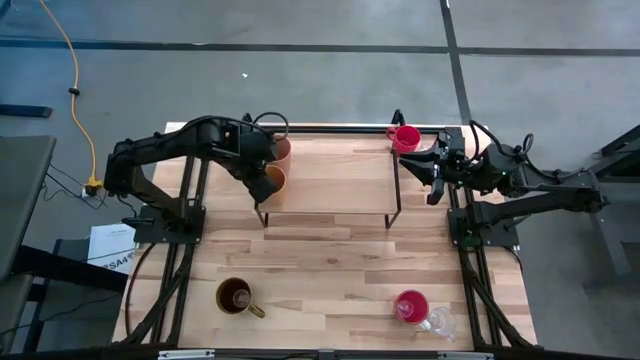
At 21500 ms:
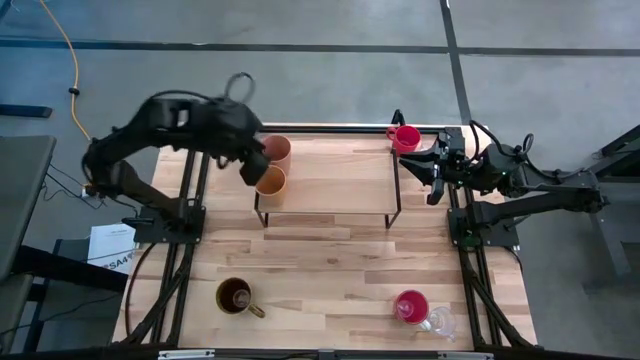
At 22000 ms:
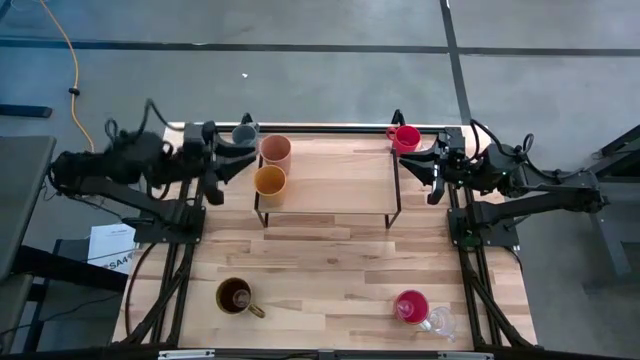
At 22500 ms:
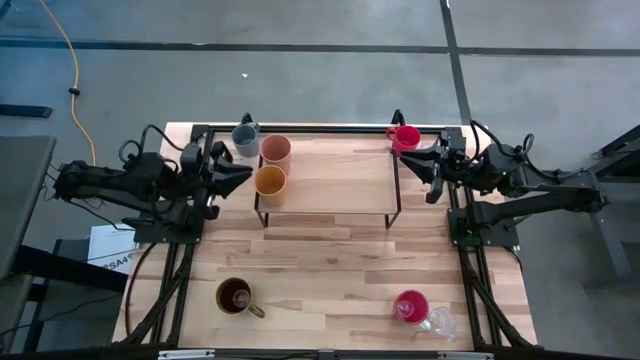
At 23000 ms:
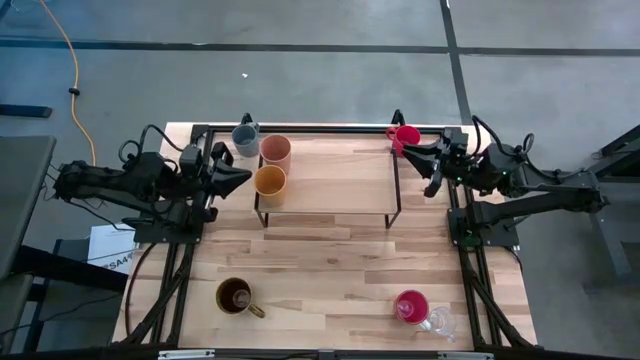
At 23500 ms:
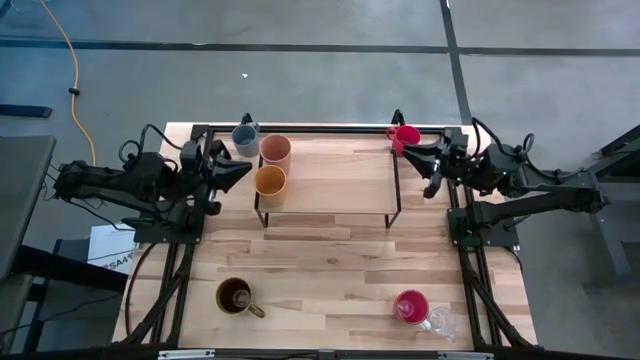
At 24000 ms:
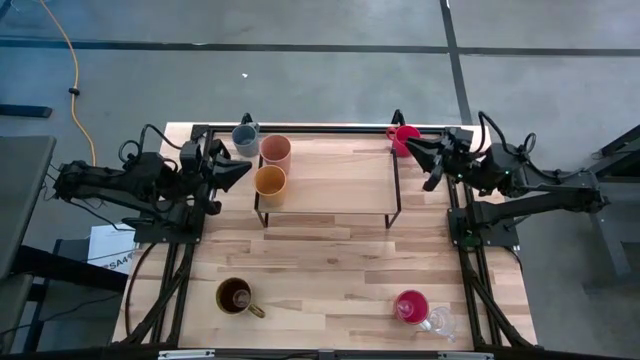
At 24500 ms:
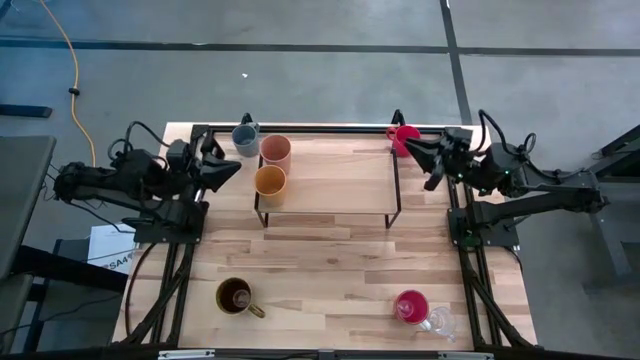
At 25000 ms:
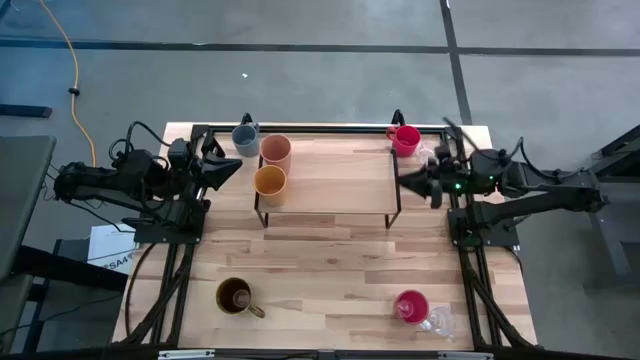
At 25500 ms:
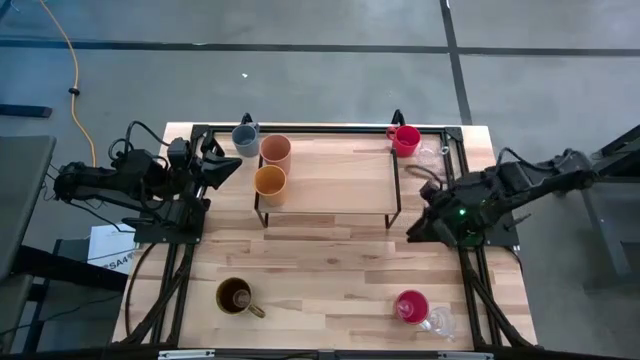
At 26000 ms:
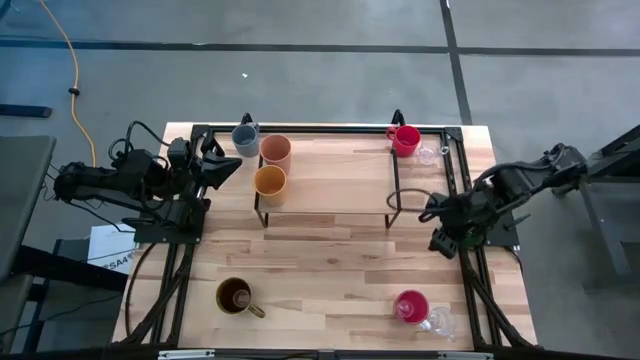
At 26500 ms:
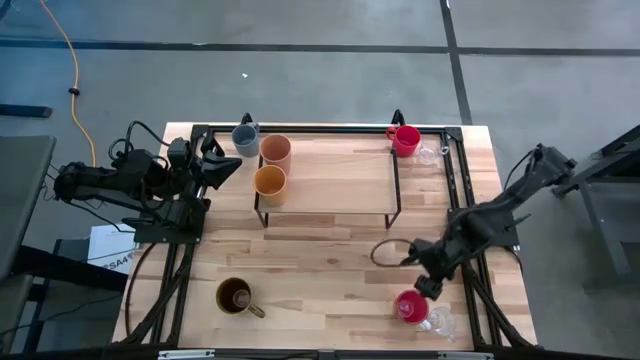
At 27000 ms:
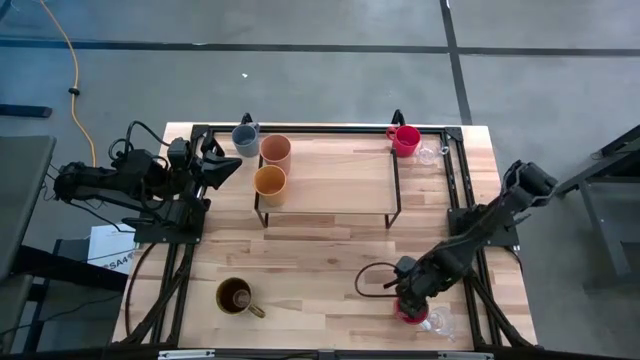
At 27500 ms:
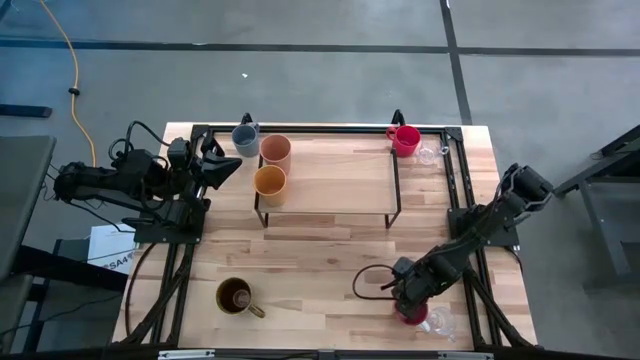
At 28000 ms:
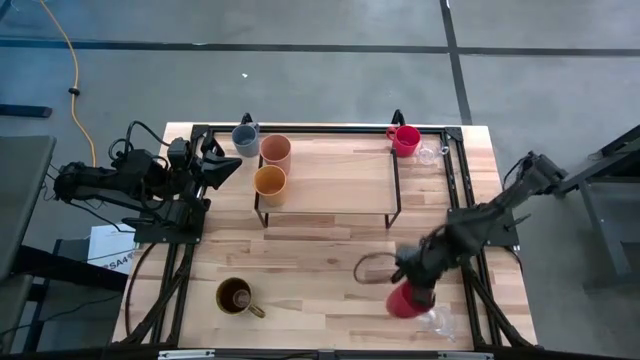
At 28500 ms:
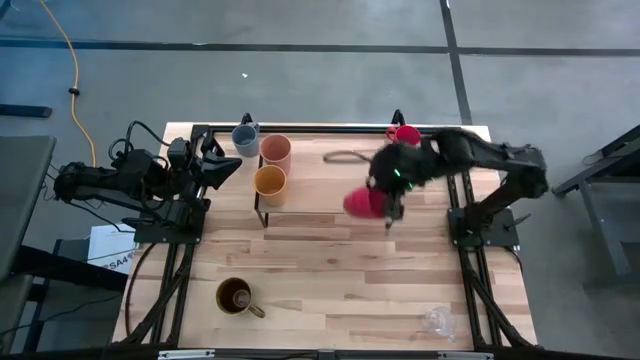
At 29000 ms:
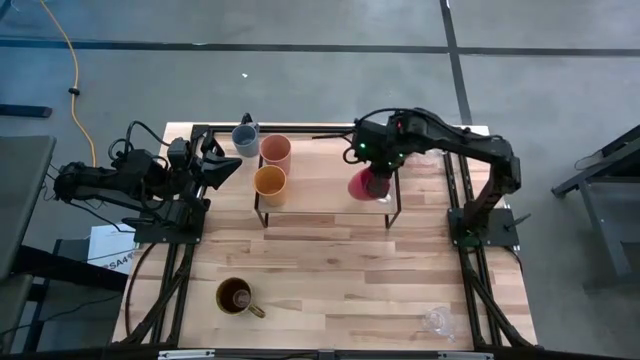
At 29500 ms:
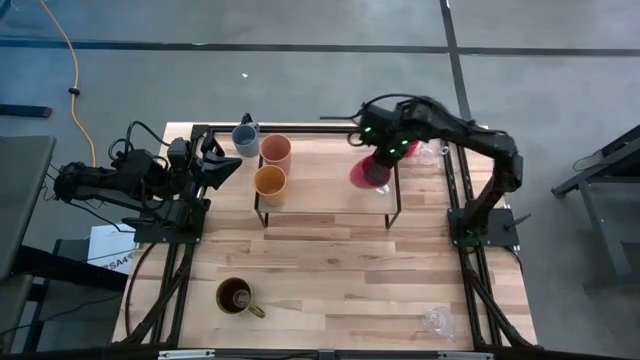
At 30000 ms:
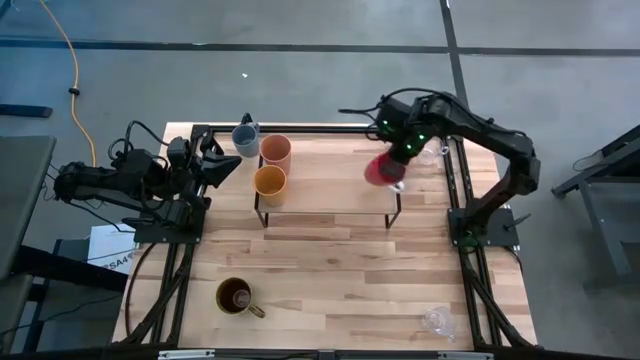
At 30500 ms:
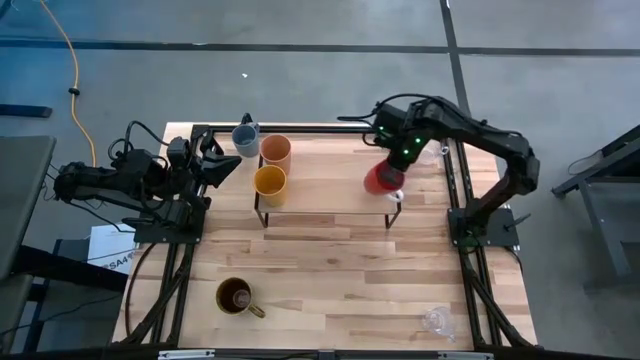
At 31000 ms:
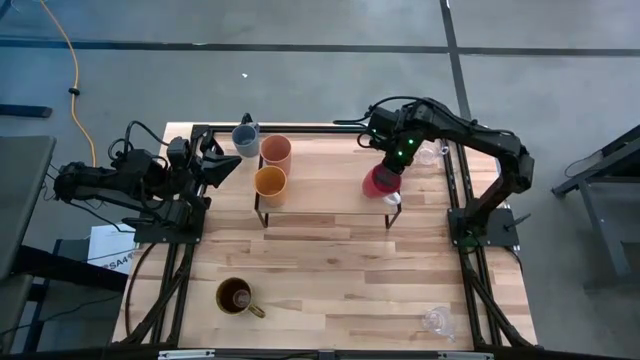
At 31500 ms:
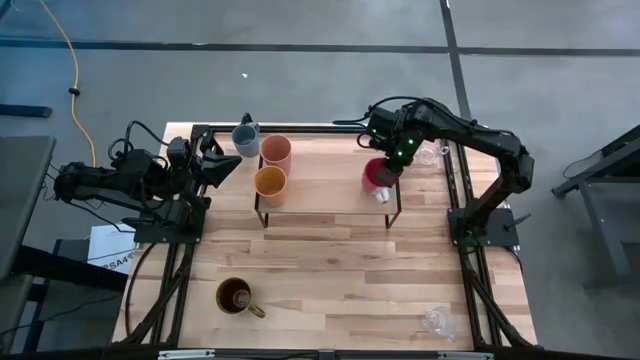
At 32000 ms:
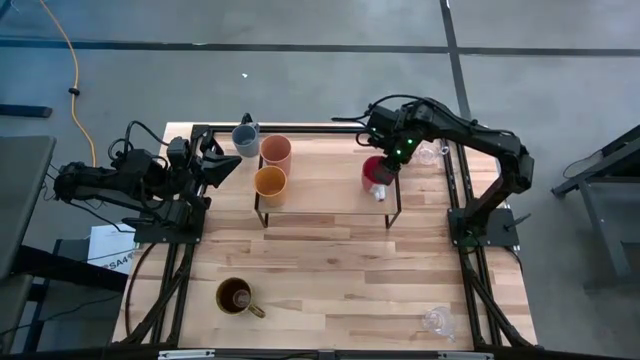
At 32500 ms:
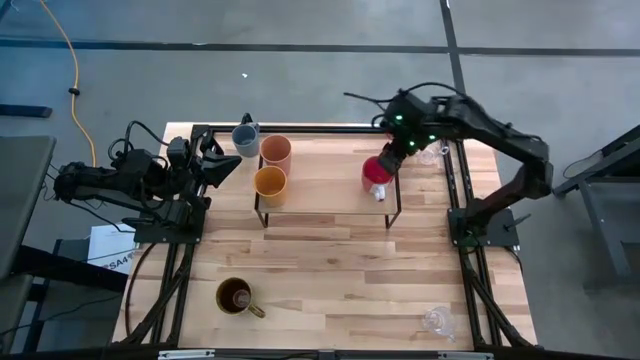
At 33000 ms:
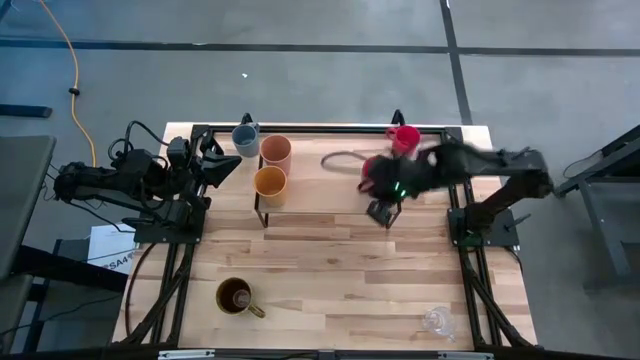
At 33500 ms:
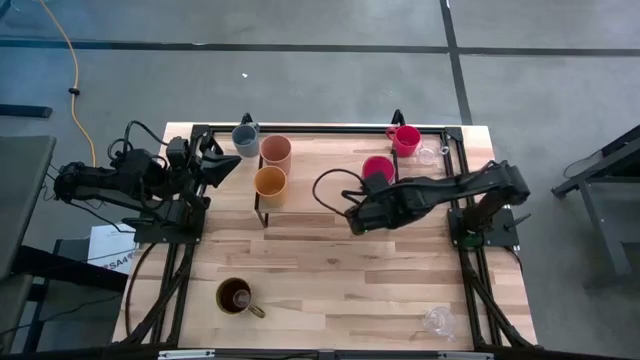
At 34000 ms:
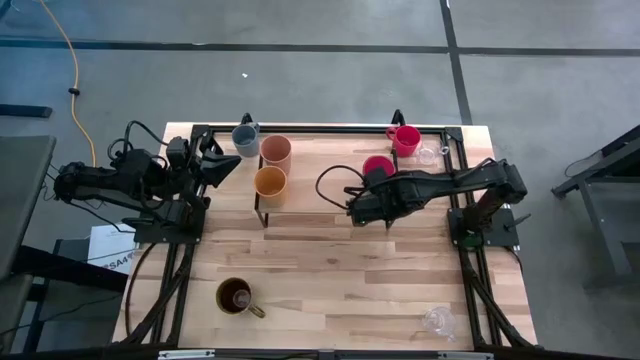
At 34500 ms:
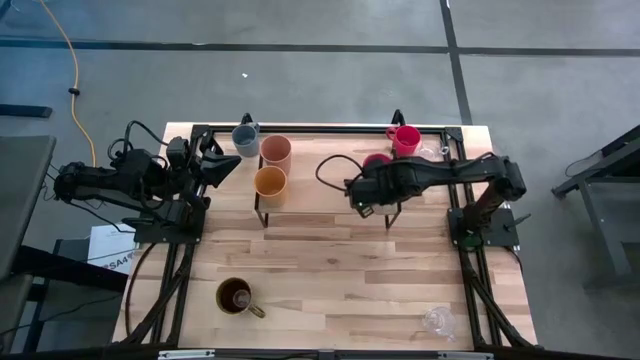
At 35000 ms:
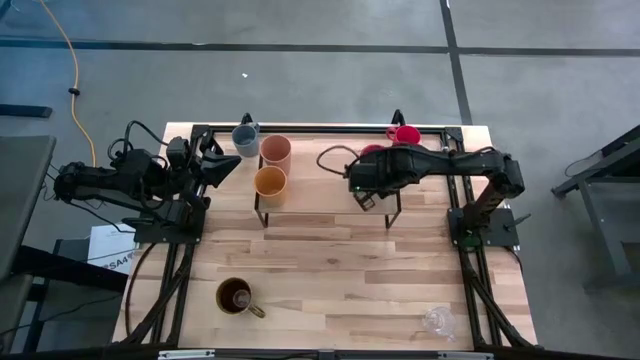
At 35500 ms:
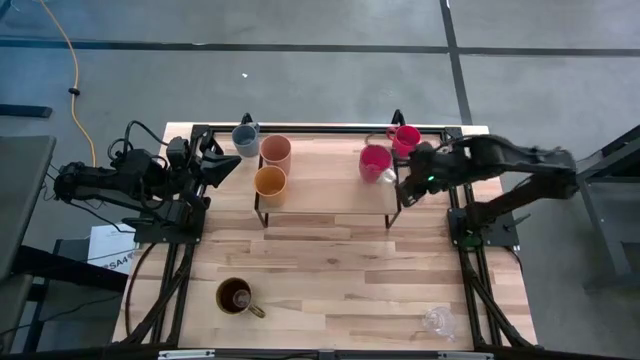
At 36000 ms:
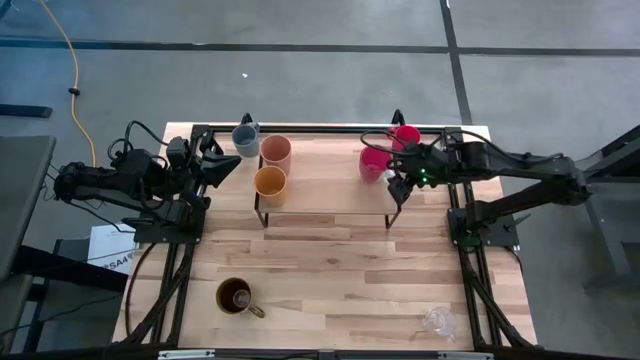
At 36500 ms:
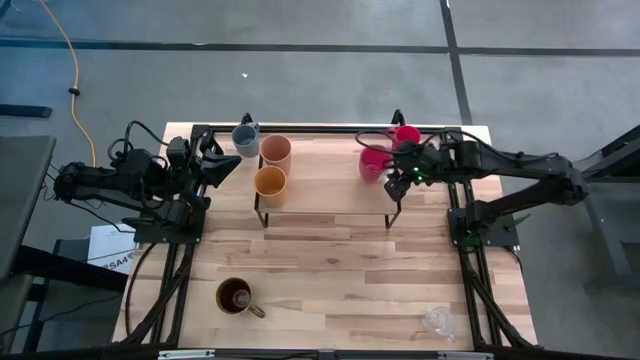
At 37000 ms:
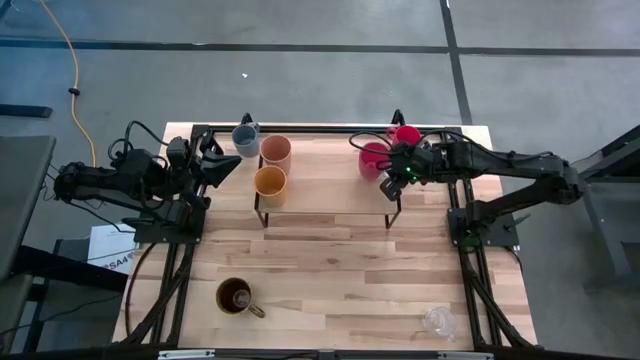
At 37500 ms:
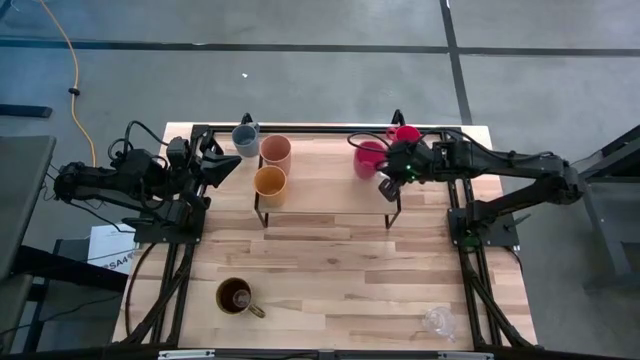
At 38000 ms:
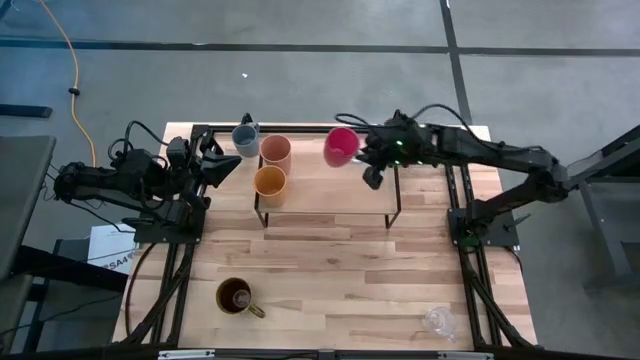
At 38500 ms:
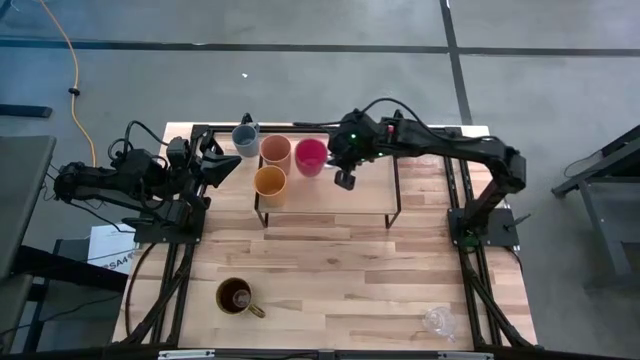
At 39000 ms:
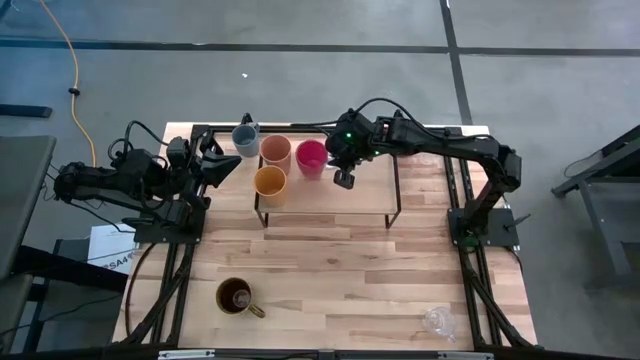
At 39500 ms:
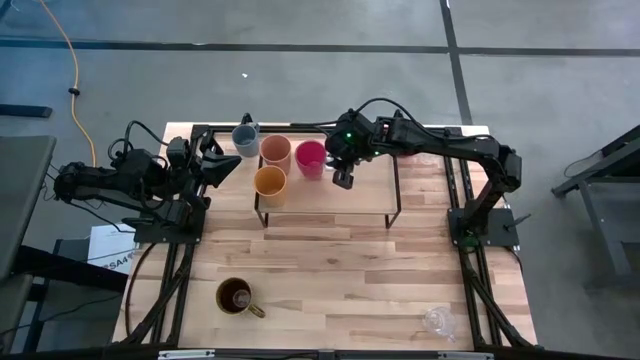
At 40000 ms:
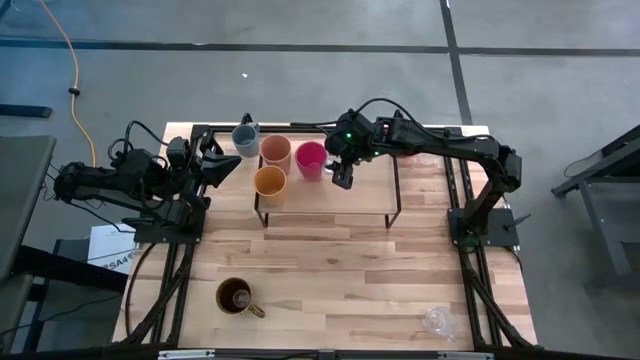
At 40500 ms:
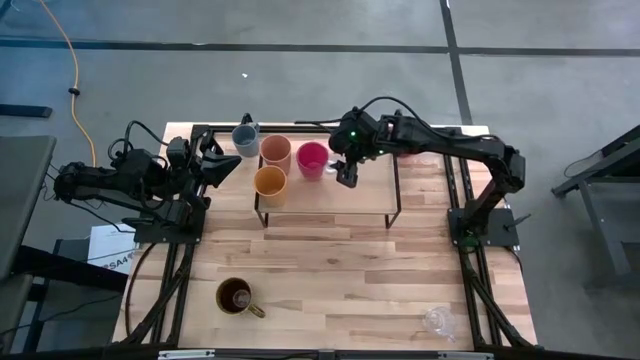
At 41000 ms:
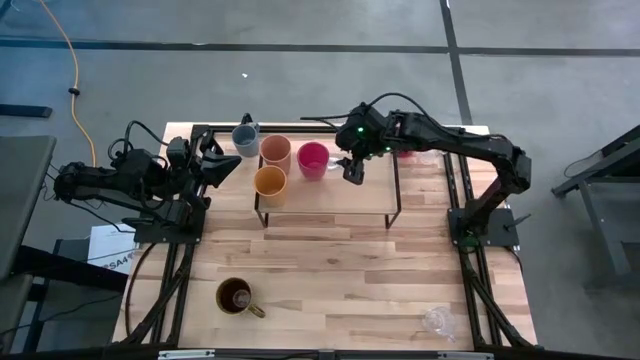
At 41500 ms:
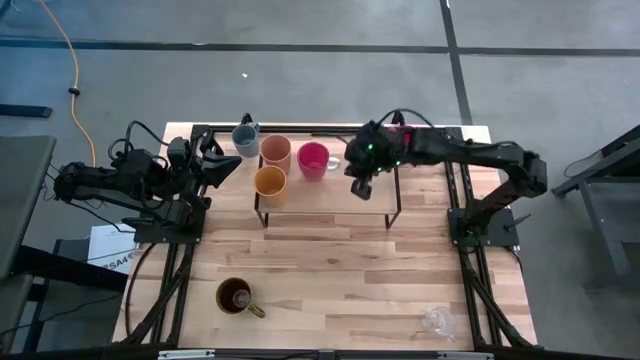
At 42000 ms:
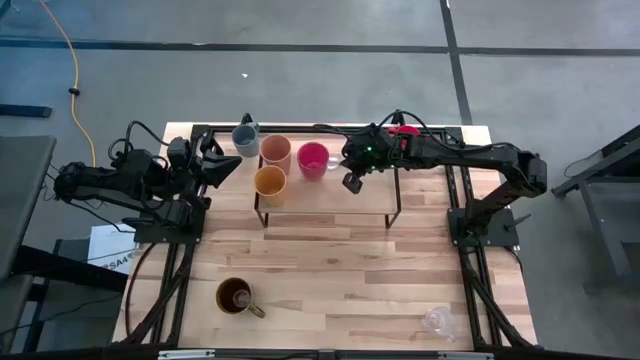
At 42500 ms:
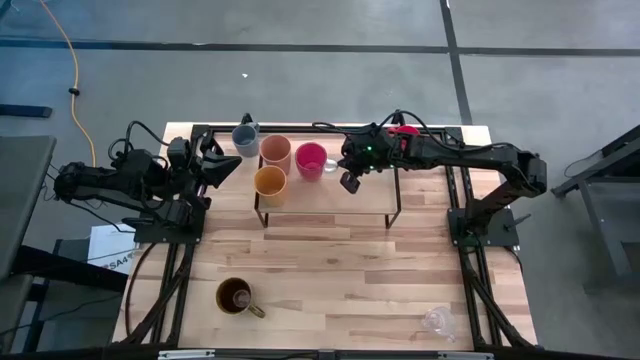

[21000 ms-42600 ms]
Task: Stack small to large cups/mugs on shelf
Put the pink mug on the shelf

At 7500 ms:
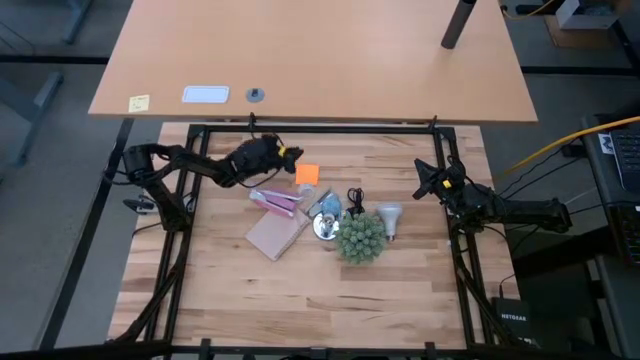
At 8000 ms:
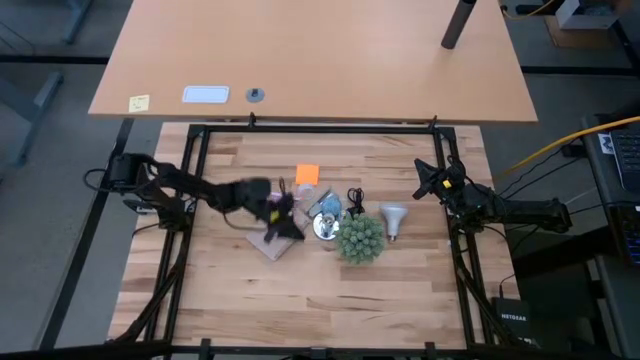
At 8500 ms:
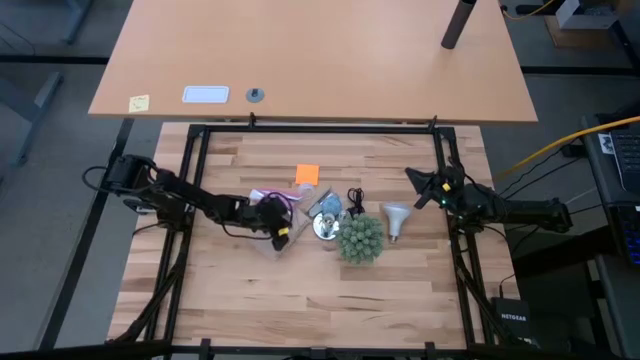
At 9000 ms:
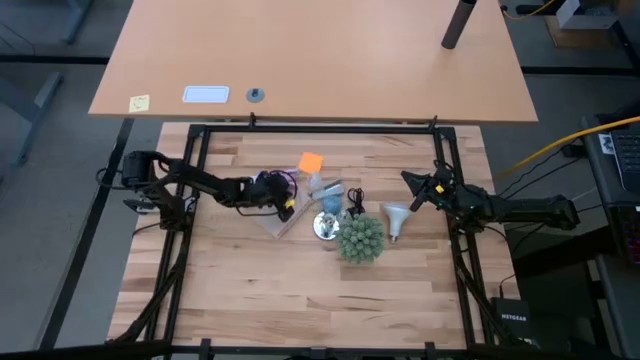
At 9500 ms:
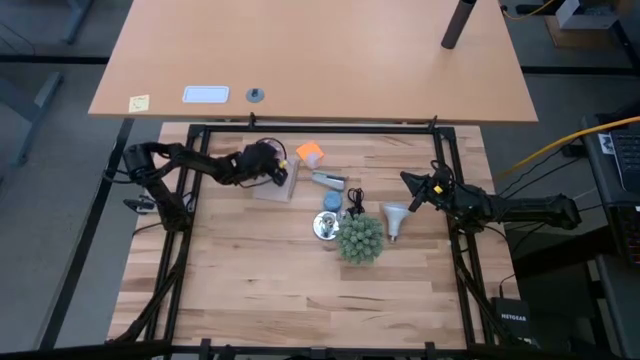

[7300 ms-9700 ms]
Task: Screw lightbulb
Move the light brown notebook to the top left of the table
